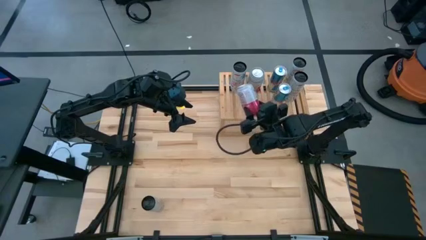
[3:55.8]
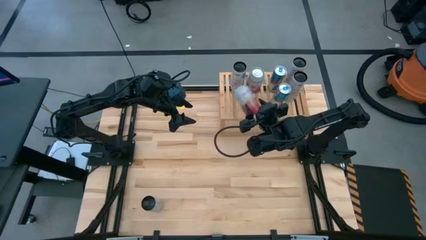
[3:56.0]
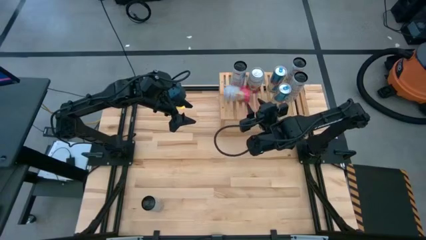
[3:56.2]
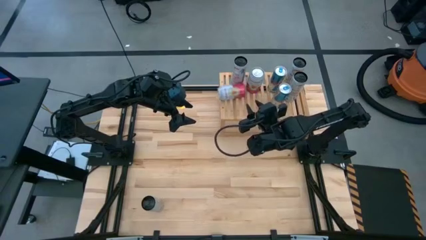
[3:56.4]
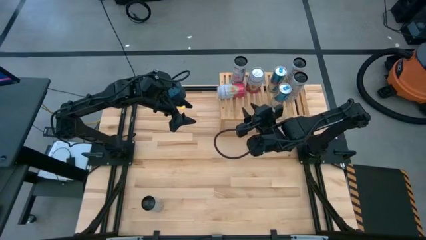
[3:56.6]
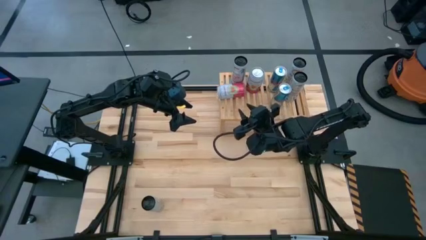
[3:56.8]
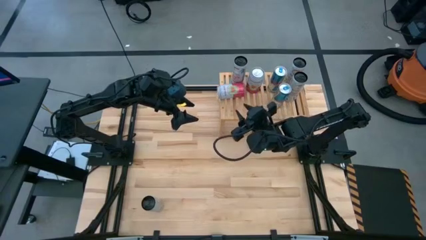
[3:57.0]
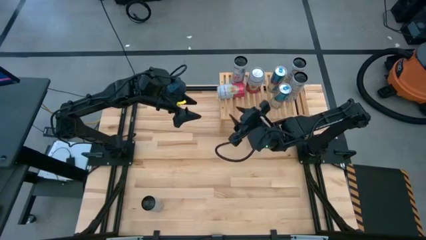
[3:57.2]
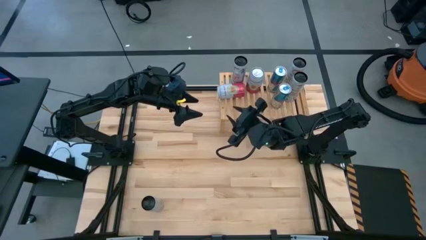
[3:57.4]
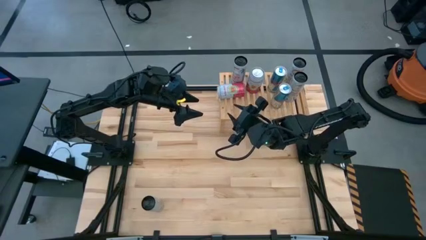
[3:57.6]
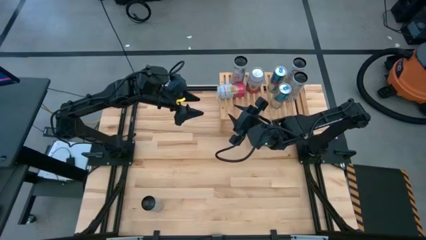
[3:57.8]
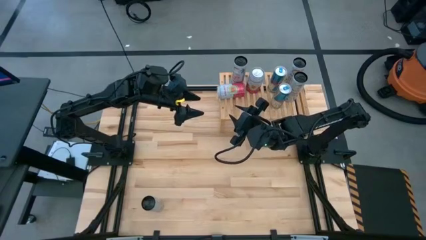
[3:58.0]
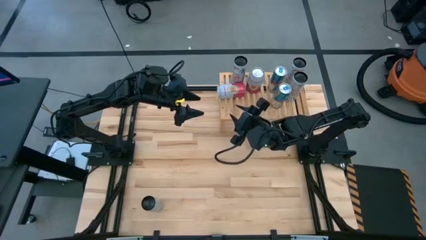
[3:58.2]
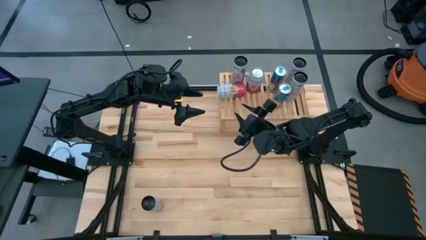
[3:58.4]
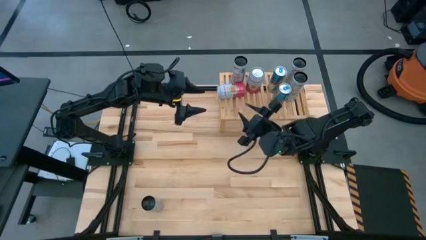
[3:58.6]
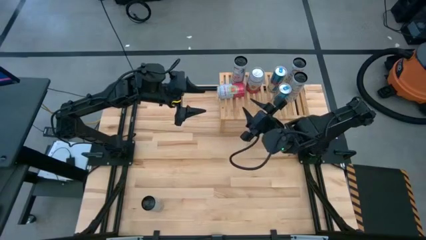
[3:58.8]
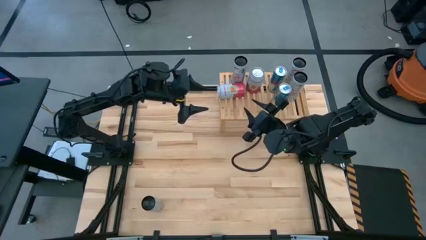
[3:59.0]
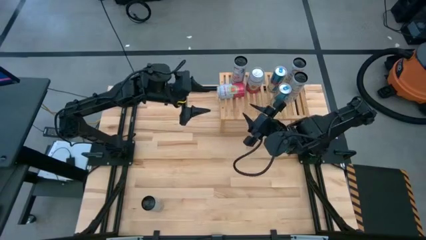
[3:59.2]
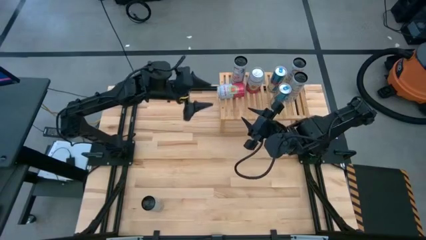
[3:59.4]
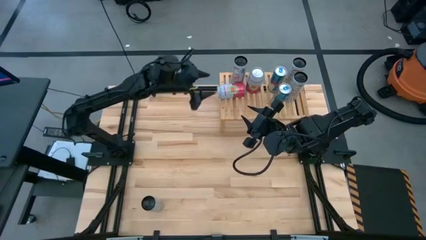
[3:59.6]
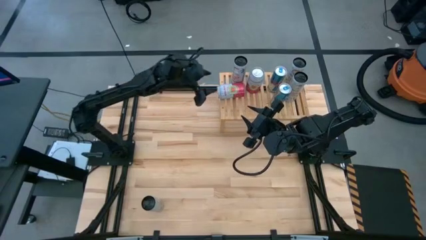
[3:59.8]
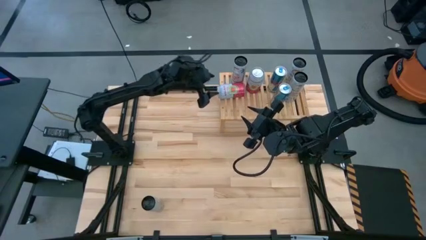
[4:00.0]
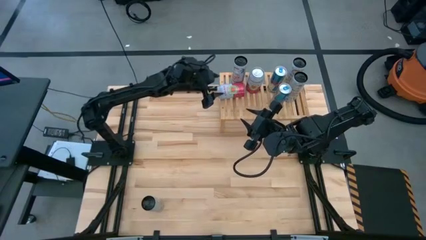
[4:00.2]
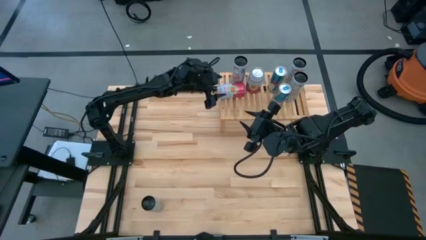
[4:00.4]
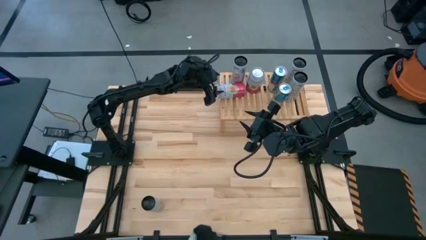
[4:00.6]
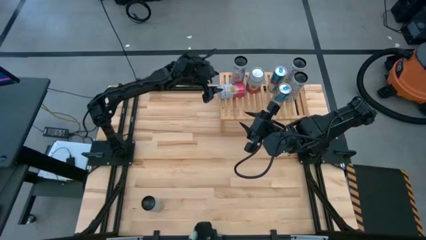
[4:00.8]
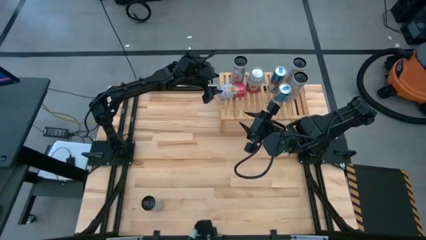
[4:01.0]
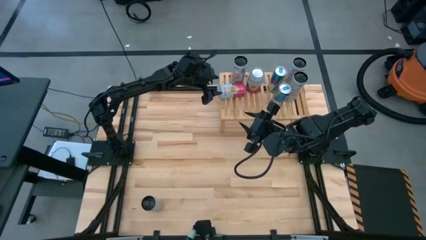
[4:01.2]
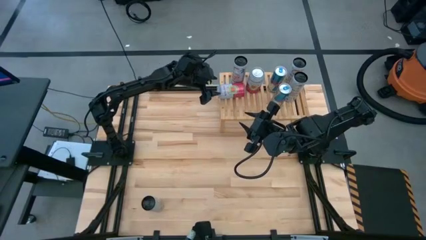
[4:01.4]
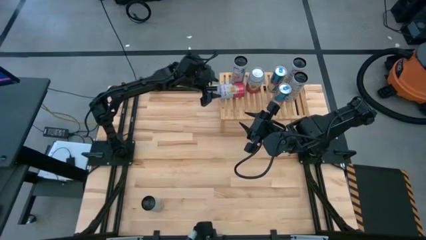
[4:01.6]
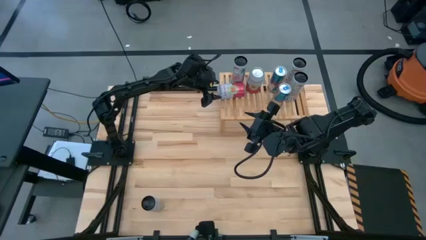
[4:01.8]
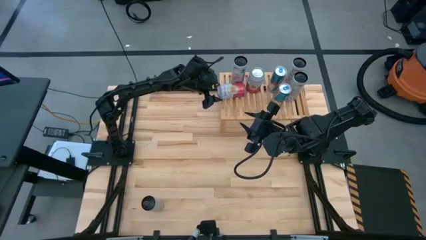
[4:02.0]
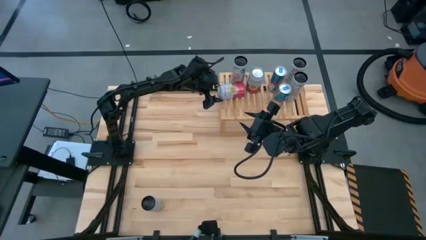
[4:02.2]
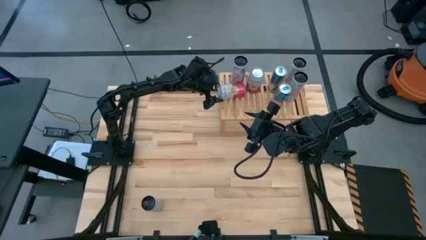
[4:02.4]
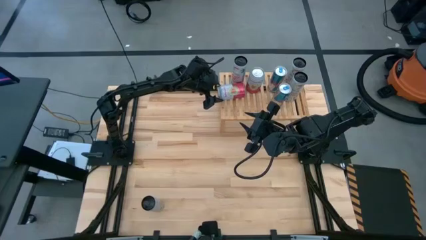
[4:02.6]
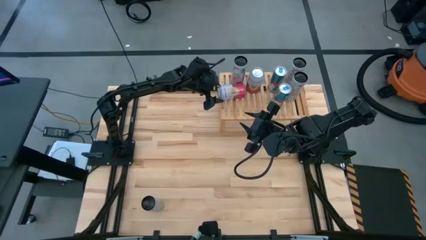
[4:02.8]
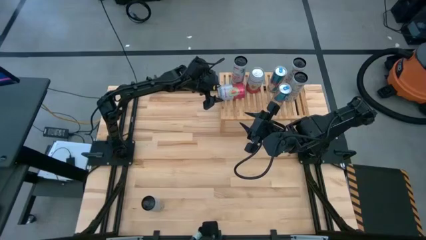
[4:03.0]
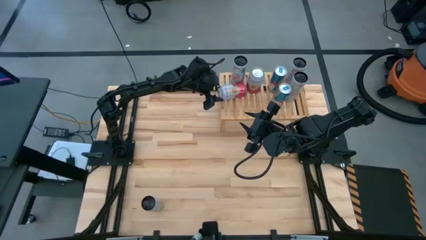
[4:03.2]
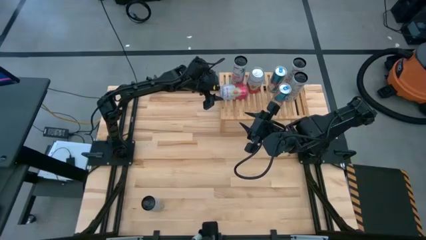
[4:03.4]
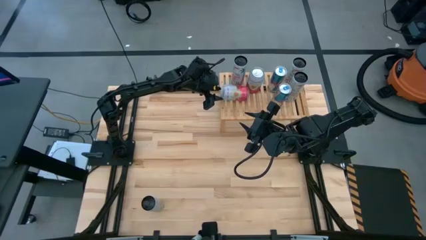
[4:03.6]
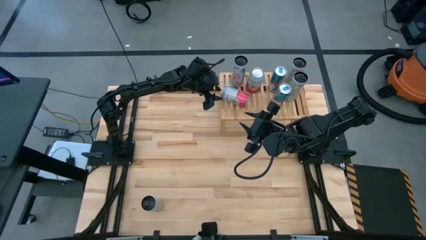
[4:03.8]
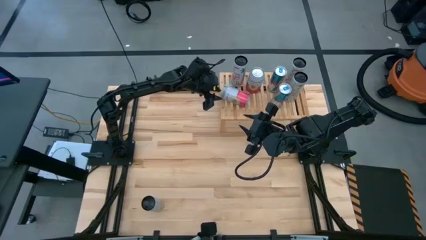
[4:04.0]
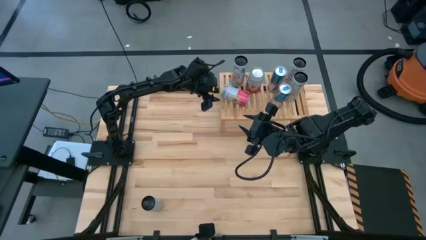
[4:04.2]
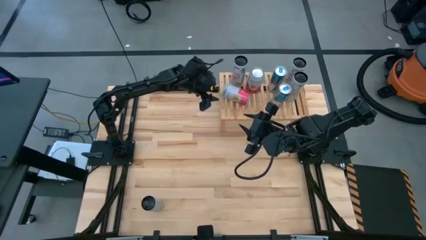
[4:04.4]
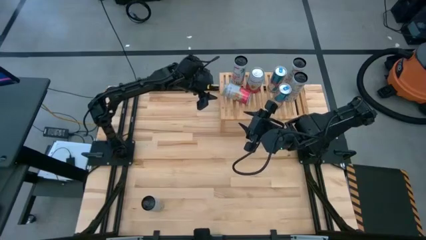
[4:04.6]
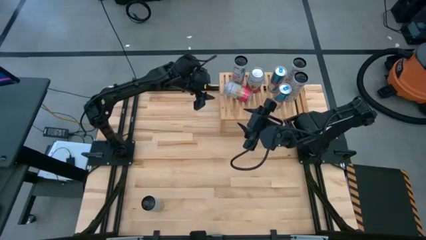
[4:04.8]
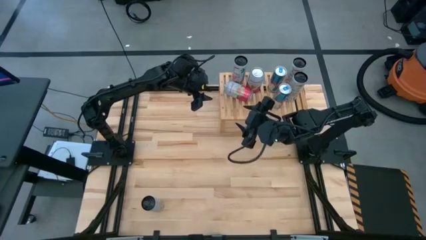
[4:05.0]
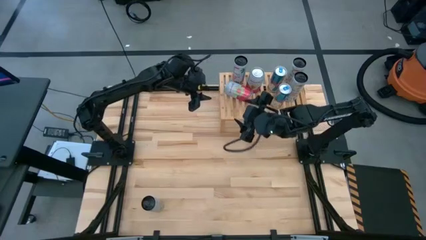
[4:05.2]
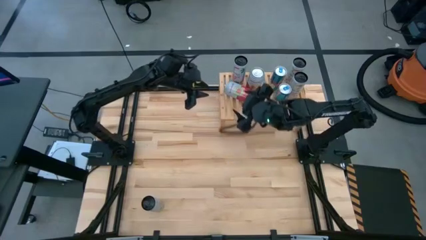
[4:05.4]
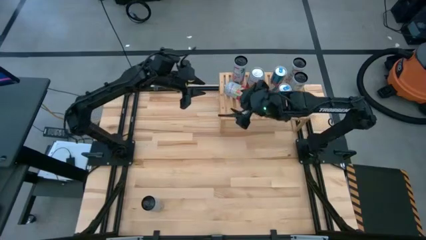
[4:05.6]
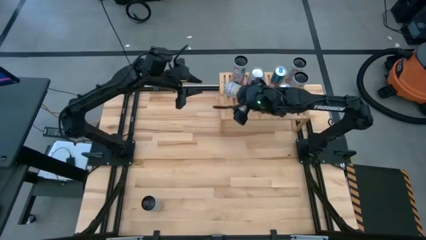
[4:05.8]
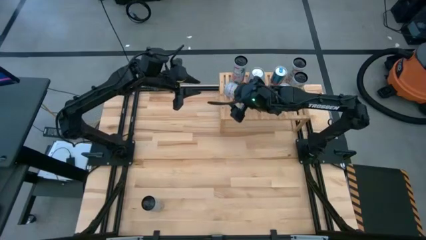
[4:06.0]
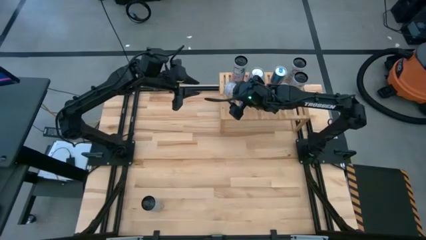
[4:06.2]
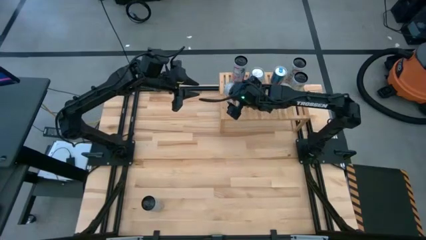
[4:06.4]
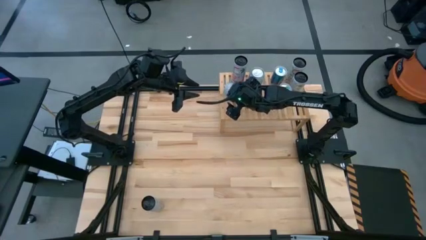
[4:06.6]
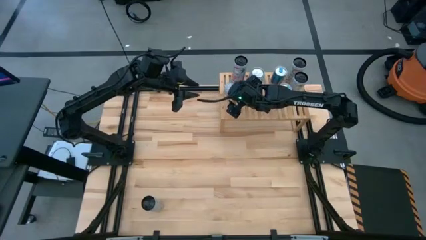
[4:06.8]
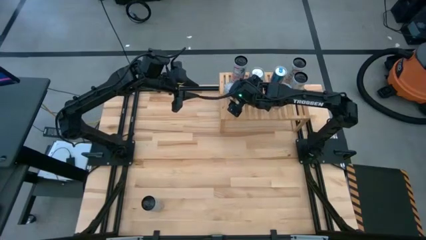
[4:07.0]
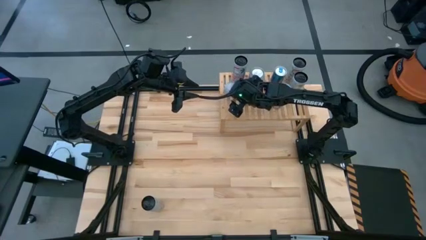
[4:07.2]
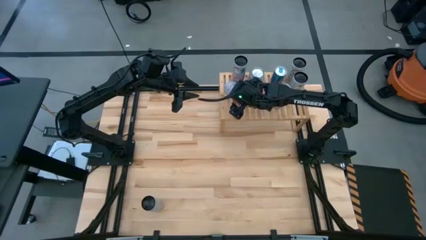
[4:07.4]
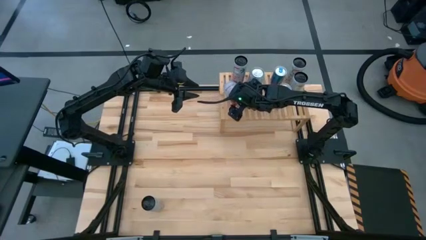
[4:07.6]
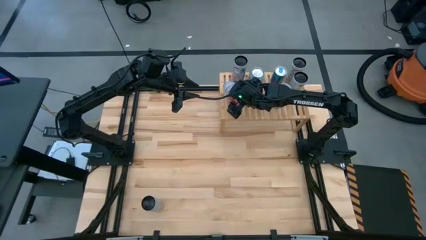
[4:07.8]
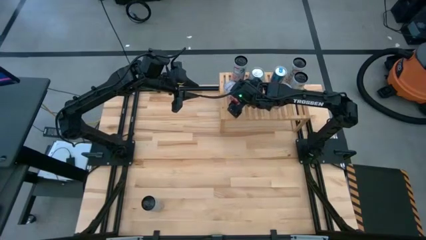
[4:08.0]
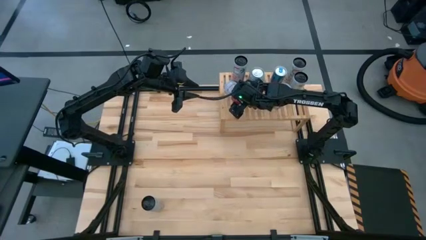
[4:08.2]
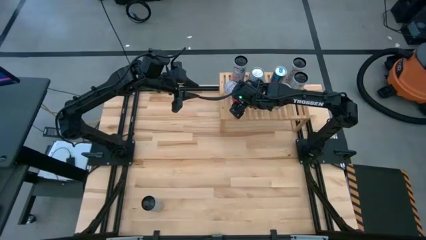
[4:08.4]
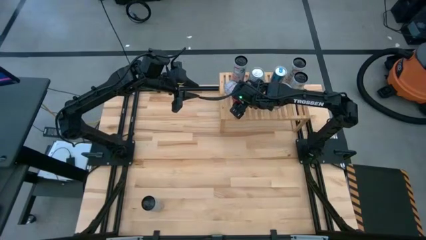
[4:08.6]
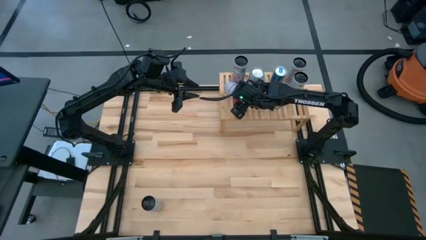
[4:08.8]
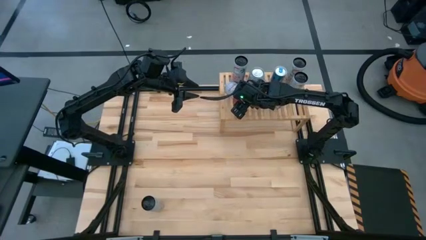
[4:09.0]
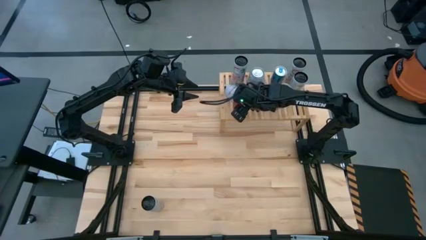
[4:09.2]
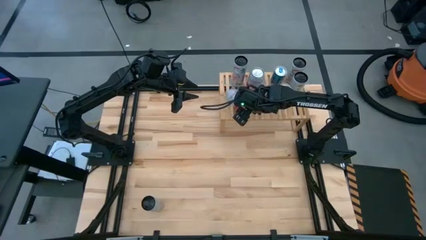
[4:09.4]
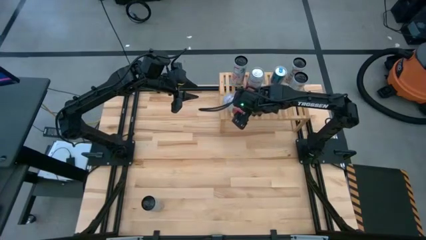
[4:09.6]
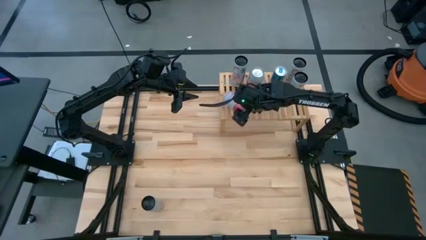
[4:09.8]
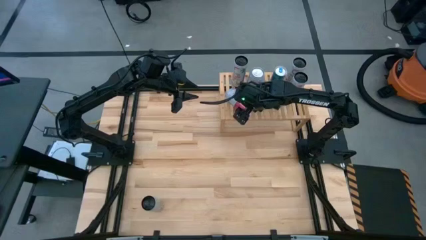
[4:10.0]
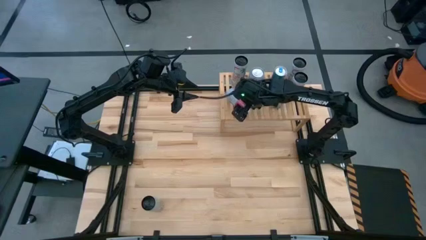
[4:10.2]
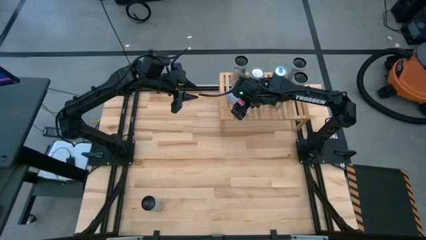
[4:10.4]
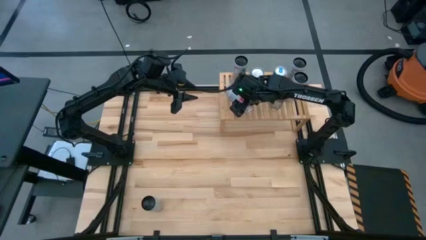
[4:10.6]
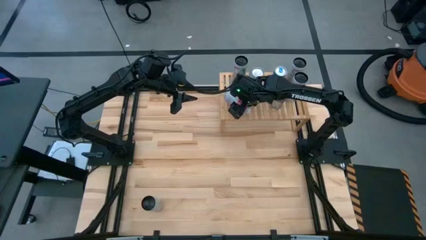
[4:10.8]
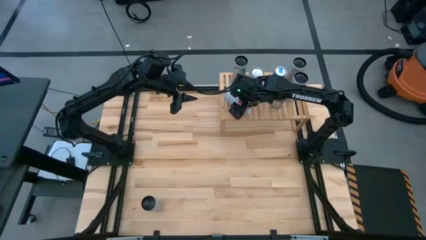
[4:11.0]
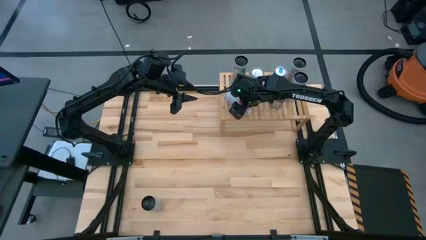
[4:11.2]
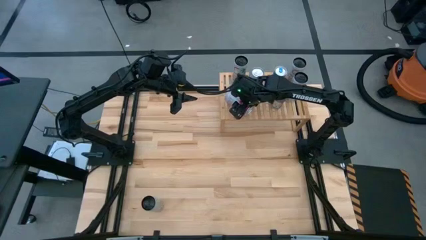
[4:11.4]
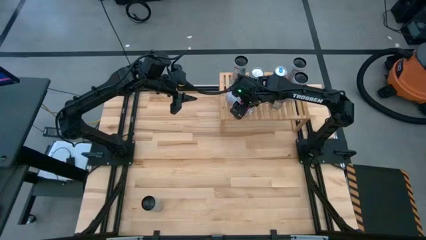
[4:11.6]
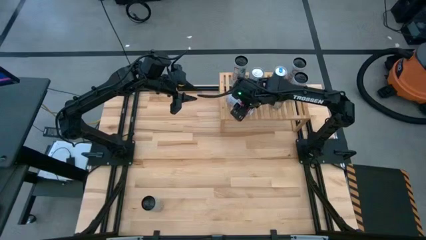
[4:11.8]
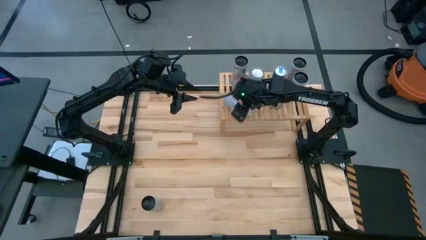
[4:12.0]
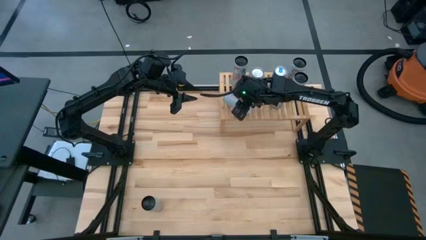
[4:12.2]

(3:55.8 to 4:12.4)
Task: Place canned beverage on shelf
Put the pink-white soda can on the shelf aligned with the other pink-white soda can
